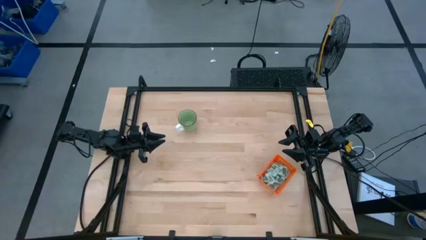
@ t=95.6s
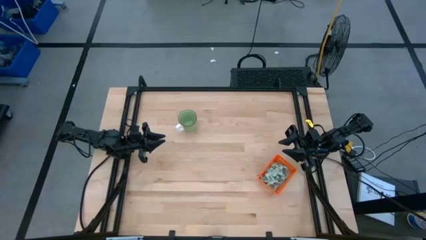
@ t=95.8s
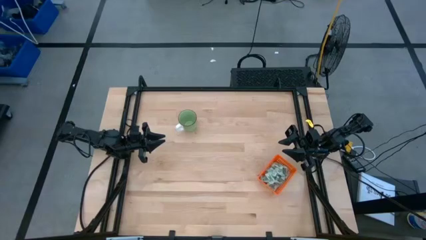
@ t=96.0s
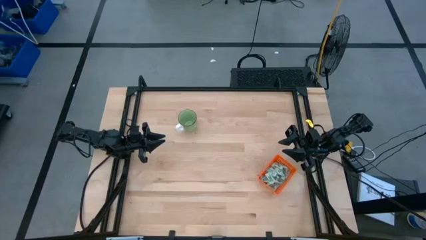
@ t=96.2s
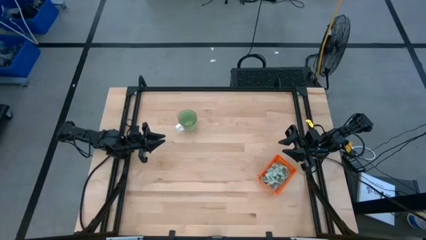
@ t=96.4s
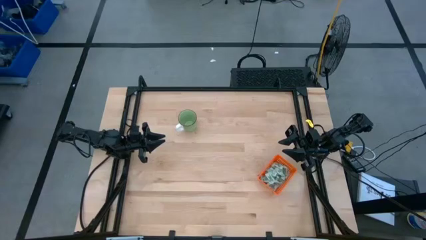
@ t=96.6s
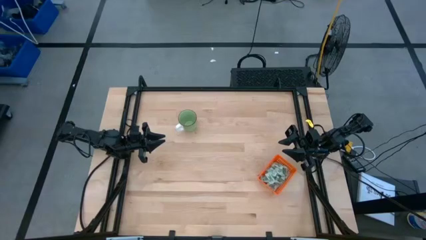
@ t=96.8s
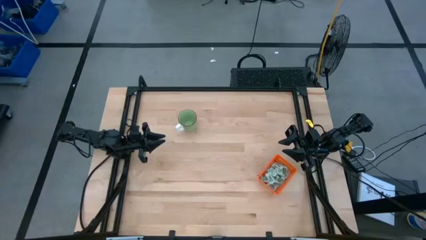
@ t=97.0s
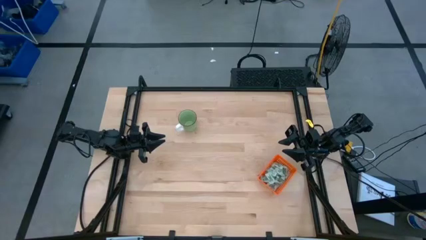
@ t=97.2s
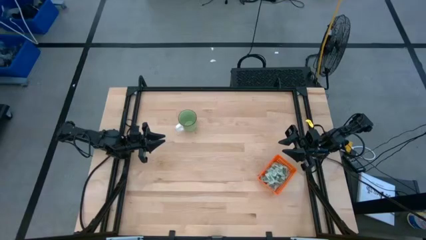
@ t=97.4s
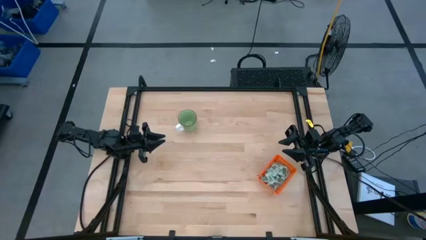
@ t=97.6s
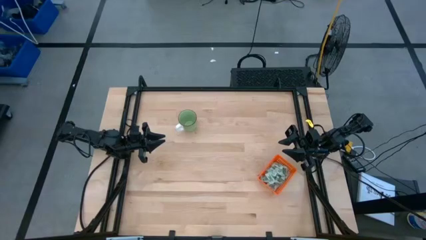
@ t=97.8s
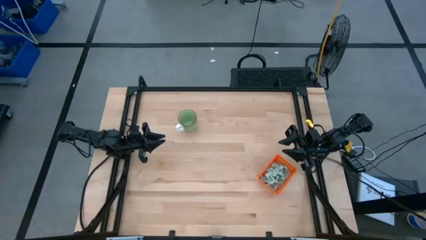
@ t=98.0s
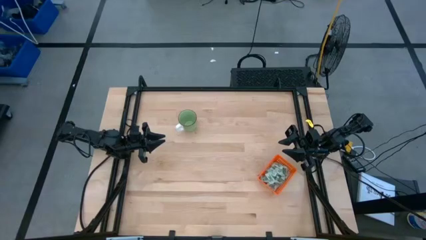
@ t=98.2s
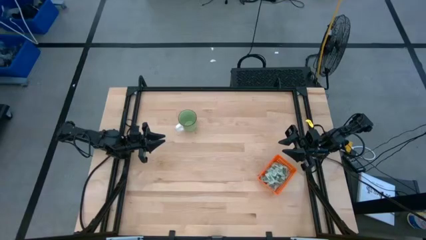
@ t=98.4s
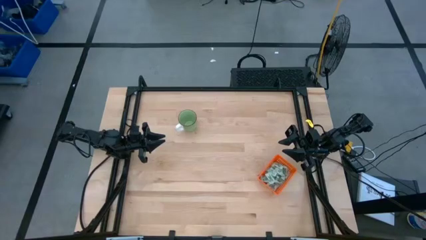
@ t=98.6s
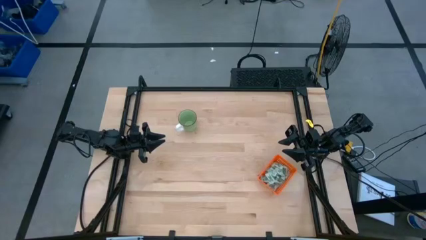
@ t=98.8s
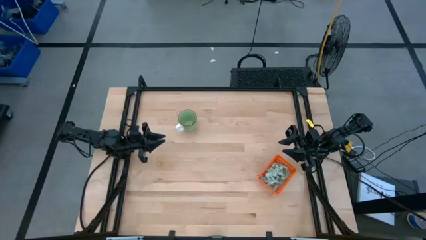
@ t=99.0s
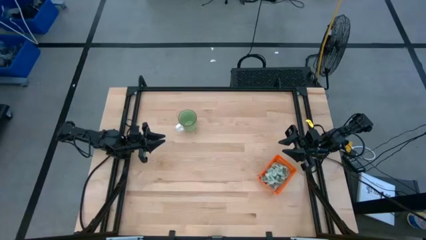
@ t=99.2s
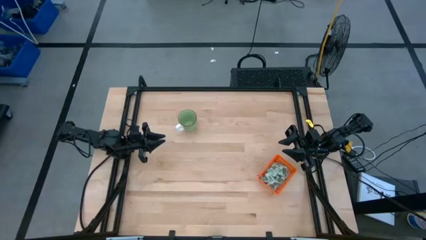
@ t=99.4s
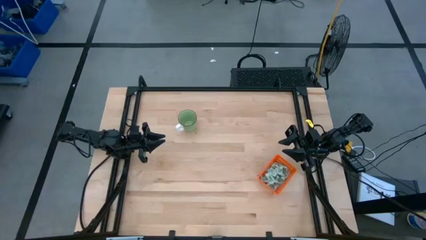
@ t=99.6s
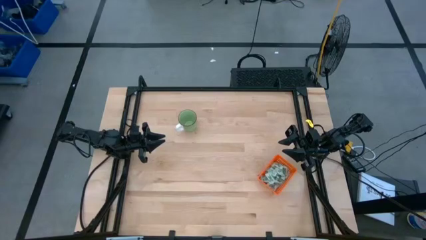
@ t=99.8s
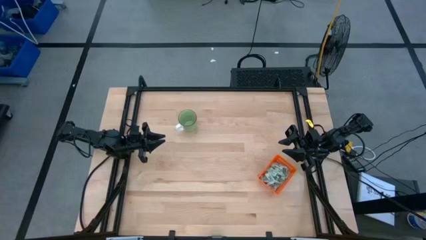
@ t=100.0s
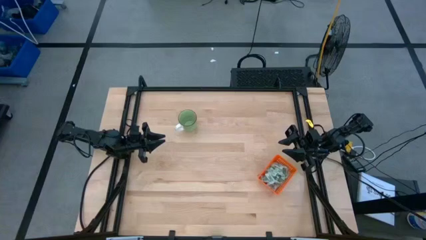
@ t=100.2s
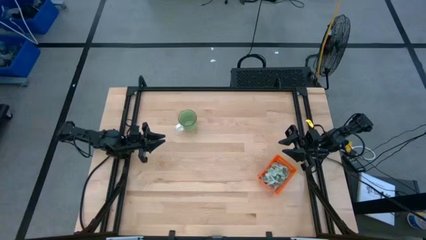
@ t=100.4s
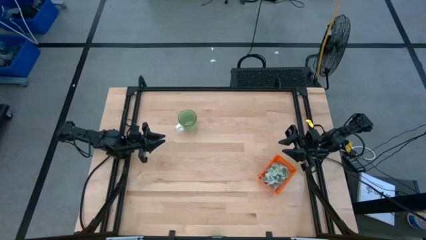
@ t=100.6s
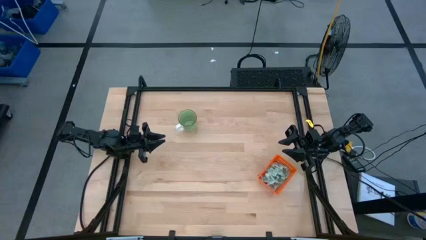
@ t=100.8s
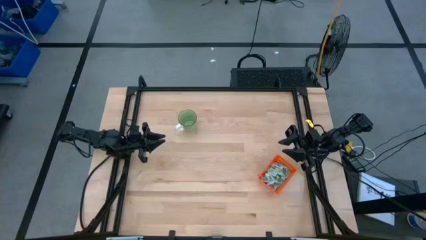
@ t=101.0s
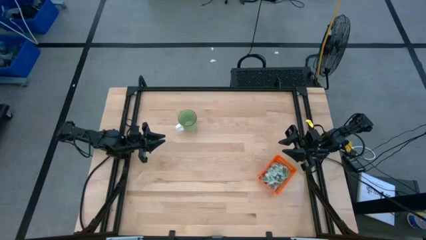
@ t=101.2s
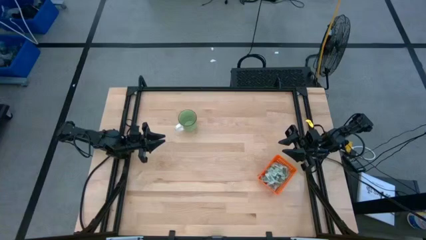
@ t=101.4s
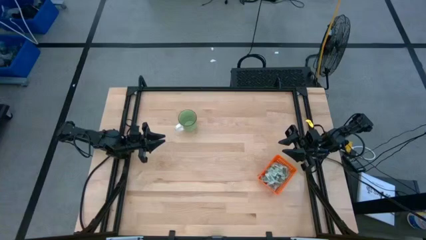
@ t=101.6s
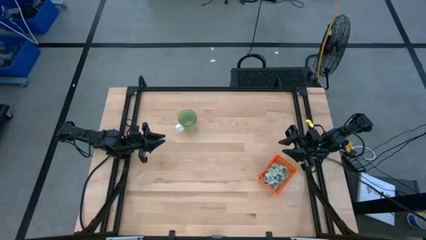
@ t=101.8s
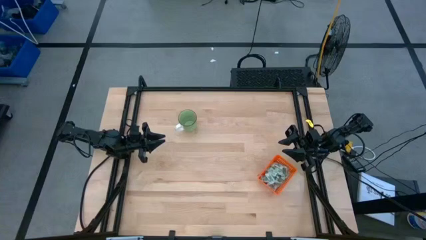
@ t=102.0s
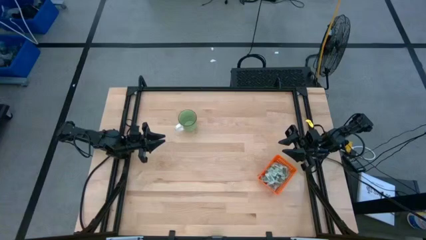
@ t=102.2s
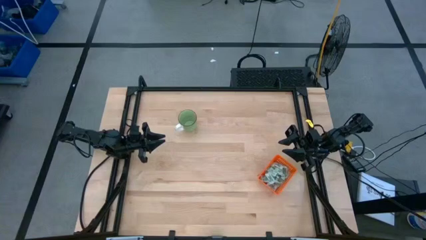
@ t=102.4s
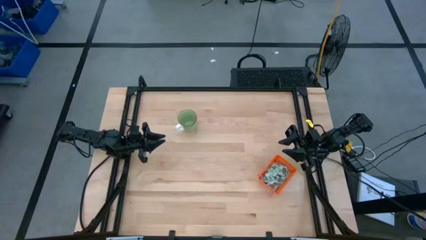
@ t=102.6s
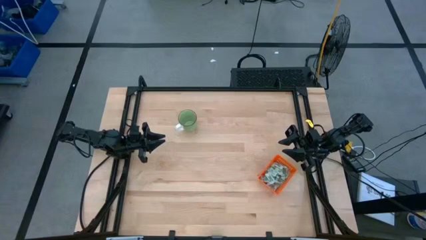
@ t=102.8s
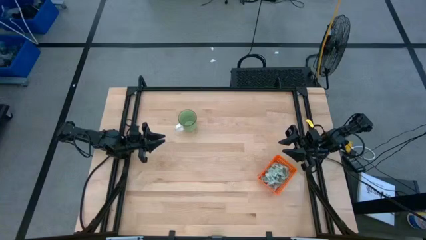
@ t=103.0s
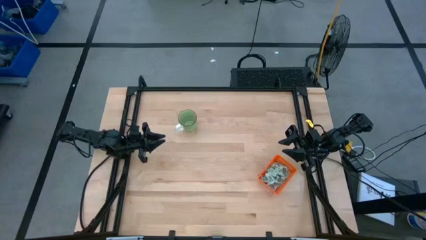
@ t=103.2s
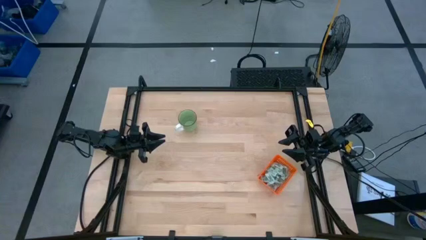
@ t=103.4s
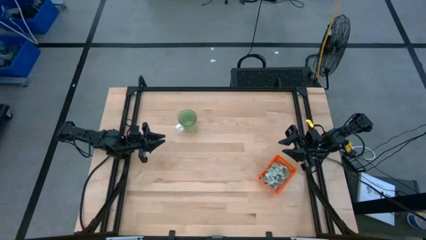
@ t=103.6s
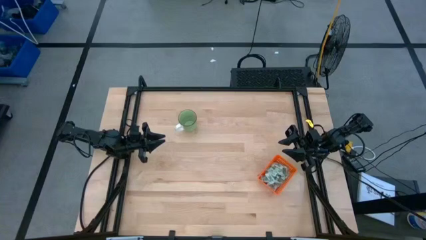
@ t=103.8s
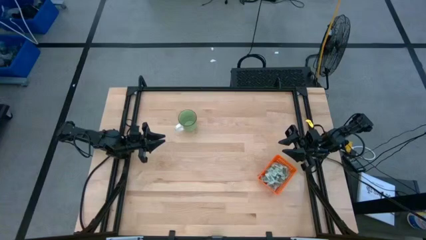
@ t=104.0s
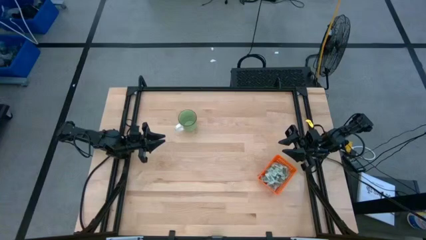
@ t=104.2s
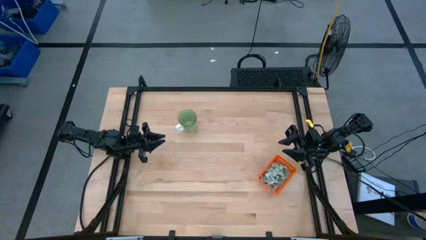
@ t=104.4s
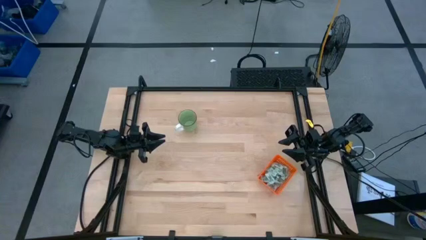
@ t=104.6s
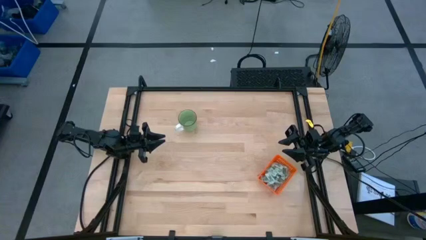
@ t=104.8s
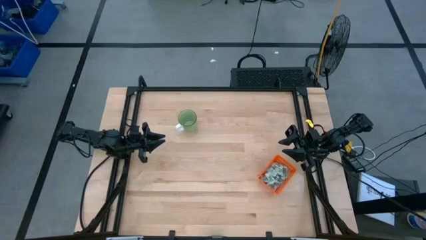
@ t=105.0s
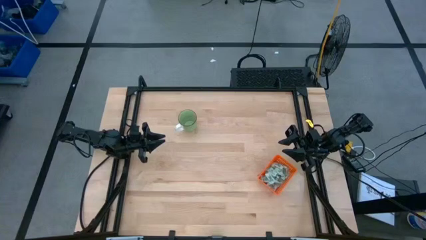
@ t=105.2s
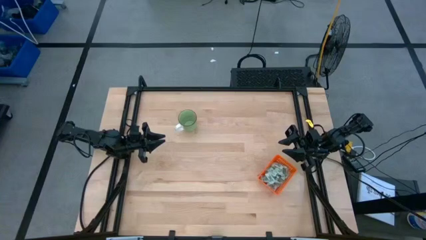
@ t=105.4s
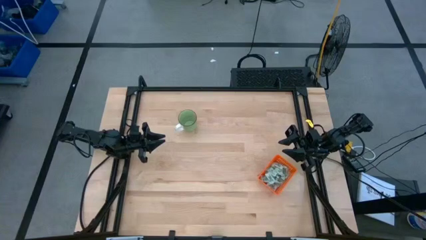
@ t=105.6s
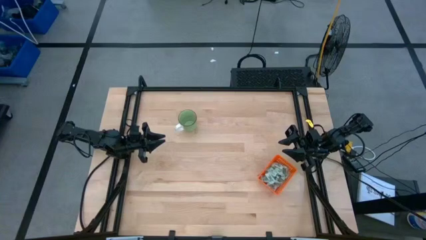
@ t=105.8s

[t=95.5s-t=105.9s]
Task: Pick and place Stevia / Truvia into bins
Return to Home Position

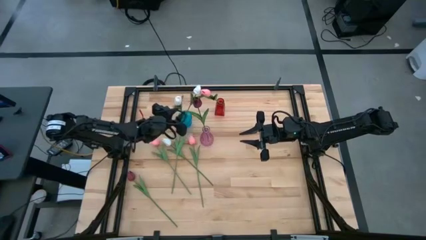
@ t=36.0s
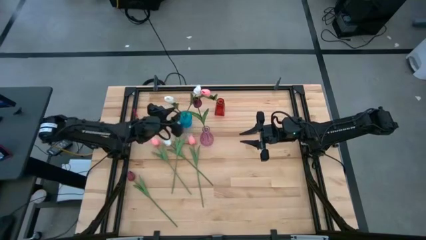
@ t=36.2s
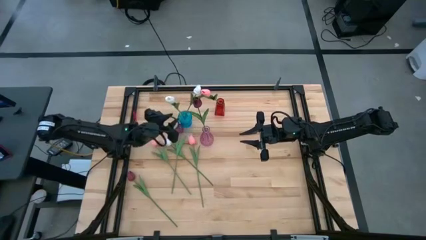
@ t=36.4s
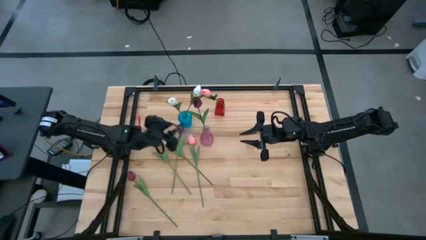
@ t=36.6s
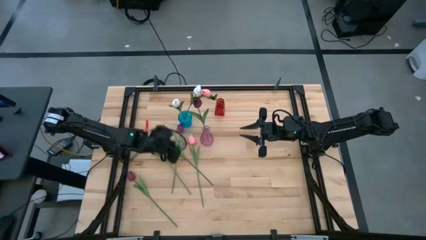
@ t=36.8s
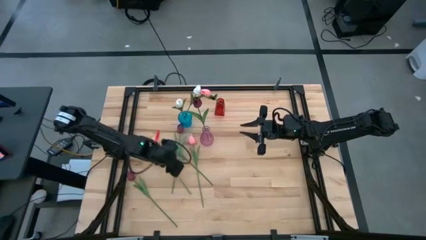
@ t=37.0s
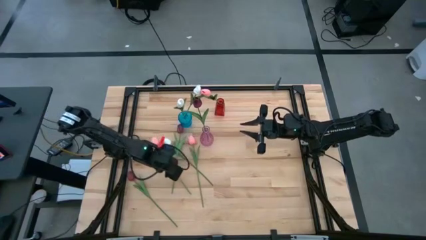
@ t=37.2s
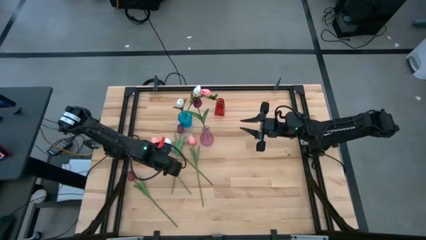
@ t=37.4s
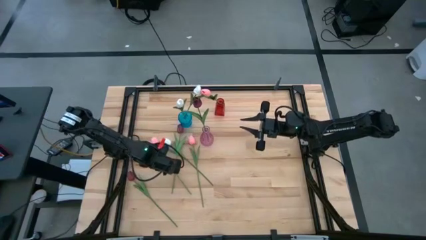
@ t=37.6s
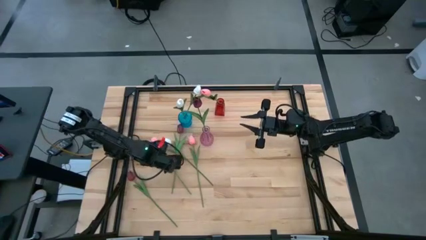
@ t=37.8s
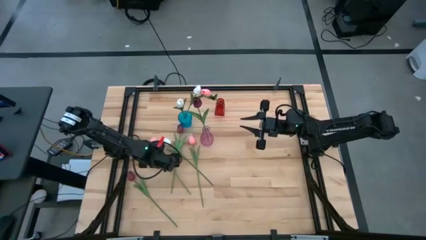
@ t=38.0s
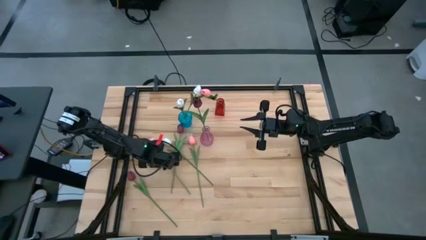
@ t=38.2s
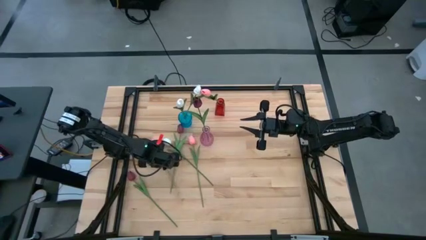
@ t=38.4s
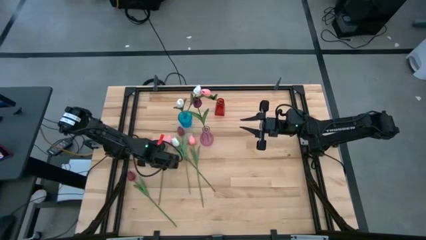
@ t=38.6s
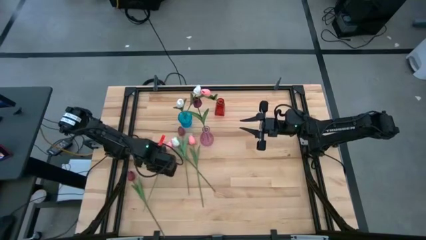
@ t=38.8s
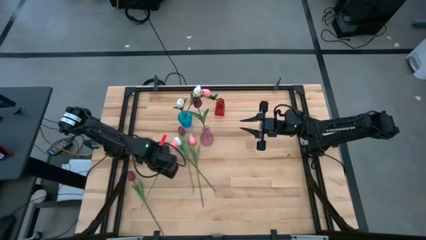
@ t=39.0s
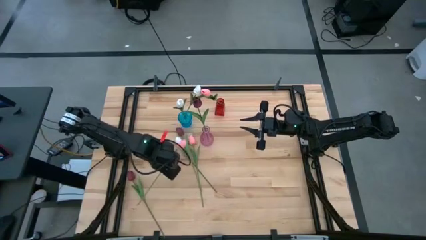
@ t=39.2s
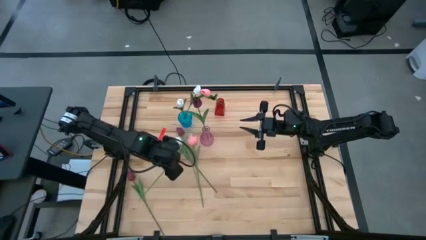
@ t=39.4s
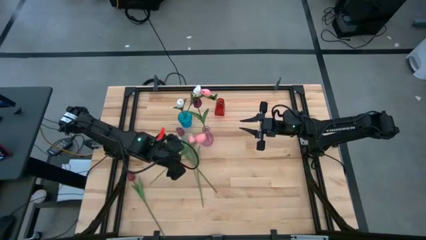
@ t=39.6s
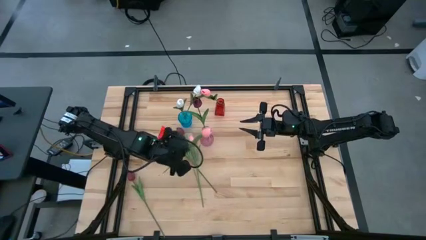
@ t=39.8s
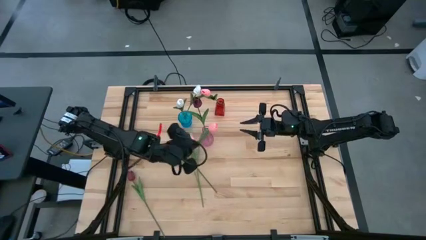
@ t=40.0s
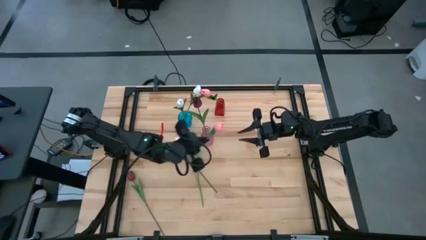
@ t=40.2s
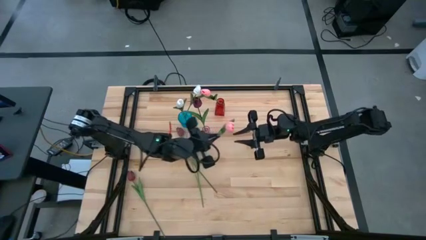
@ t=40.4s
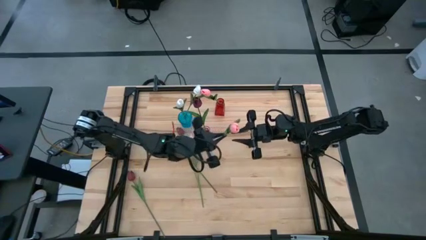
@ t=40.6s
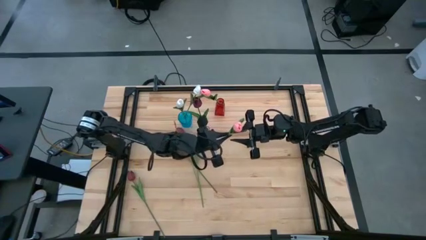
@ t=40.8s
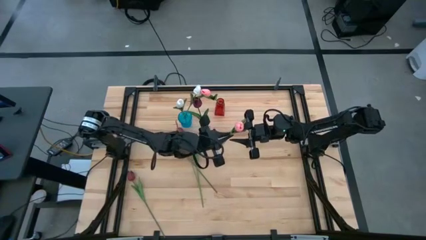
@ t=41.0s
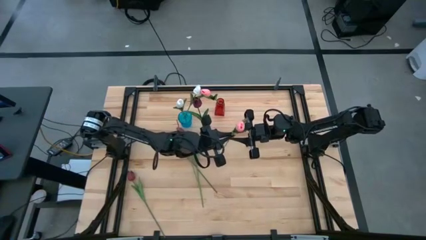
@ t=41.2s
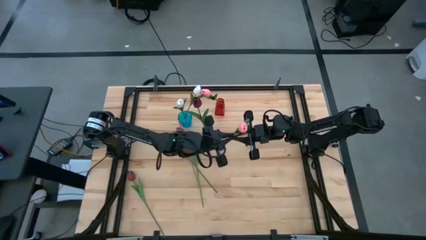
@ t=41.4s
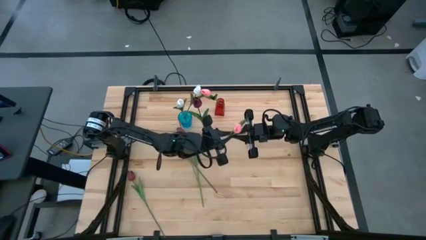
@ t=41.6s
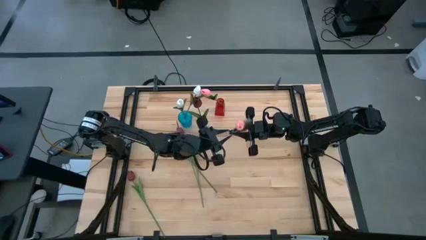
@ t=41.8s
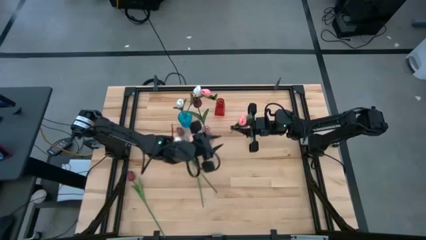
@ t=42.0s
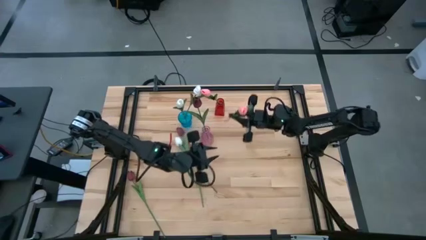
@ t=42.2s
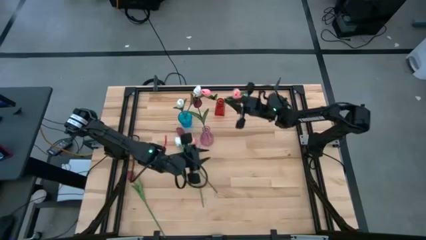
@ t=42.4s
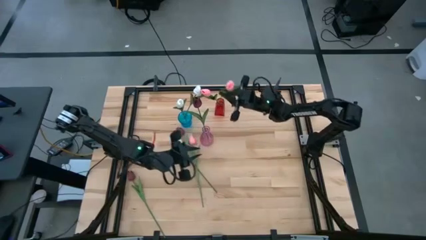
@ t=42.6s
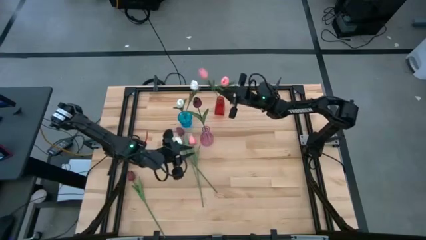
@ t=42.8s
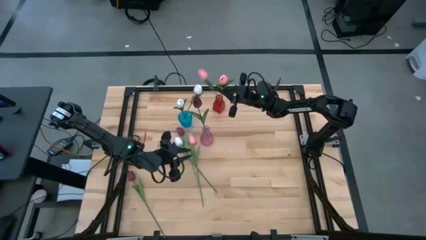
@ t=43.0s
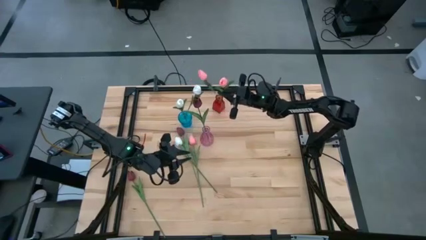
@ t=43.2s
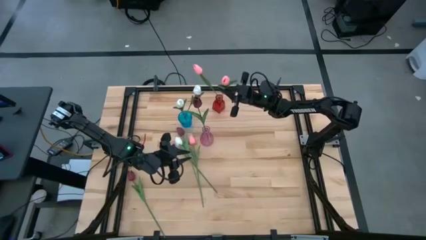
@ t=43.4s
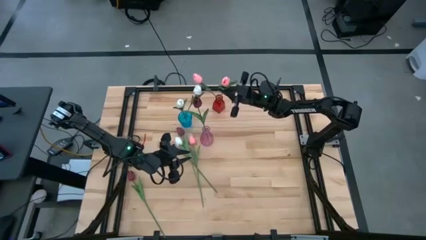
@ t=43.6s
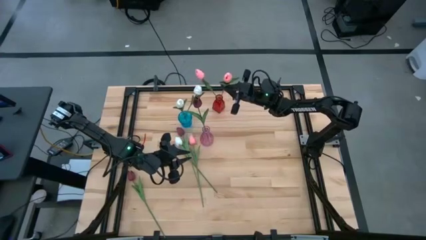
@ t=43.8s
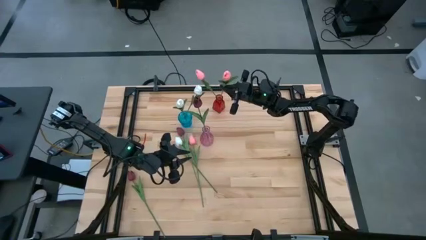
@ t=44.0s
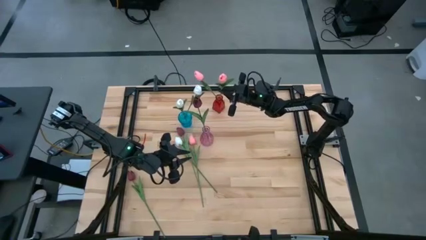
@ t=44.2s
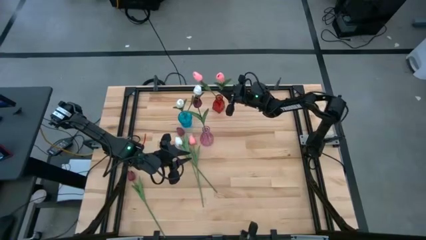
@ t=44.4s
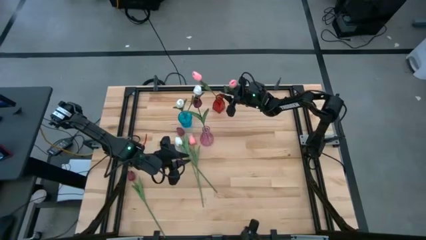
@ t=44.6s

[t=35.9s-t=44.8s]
Task: Sort flowers into vase by color
Put the left pink flower into the red vase
